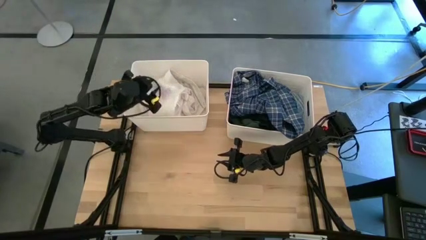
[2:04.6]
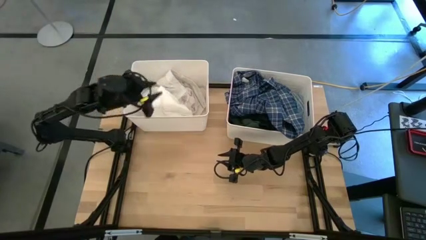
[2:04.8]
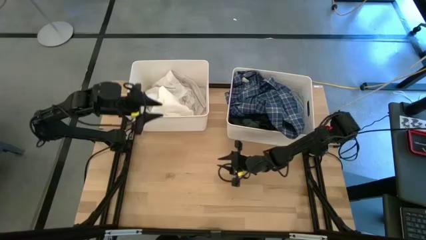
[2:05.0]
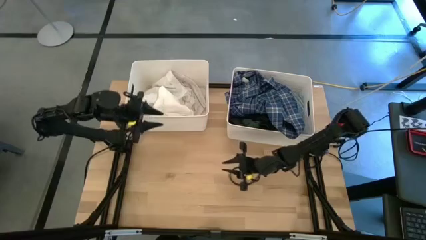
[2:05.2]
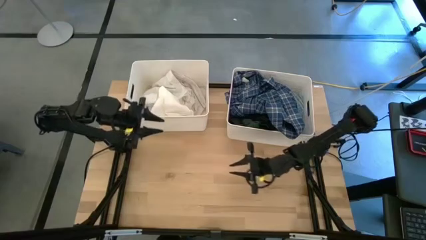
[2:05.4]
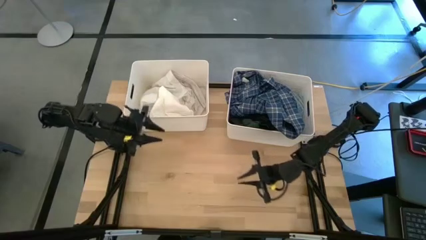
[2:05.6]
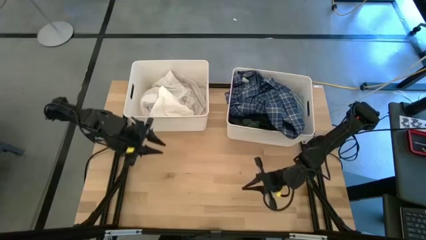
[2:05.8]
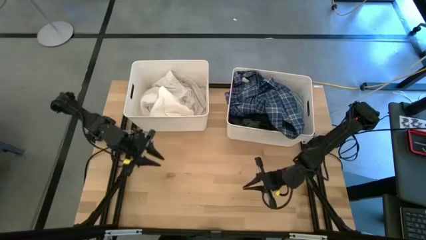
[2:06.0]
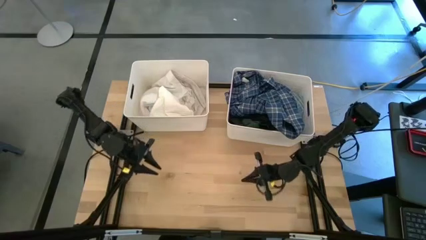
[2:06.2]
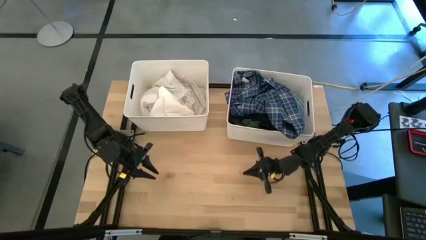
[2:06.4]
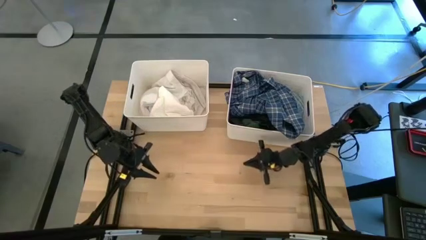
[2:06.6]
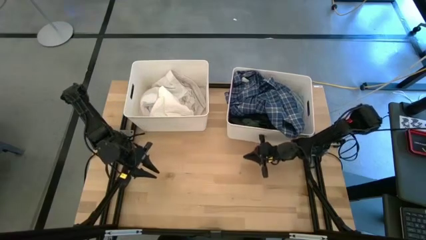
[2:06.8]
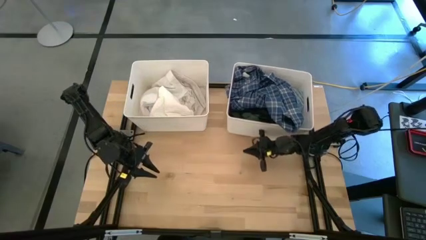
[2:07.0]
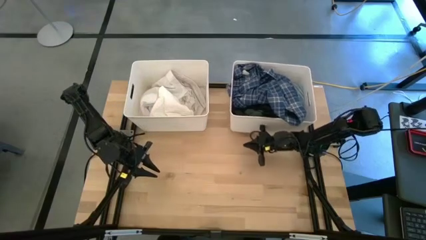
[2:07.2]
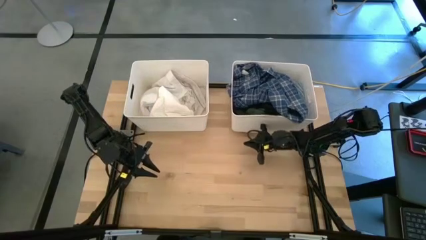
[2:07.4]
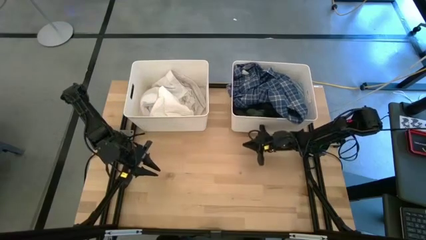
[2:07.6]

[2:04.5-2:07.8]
Task: Sort clothes
Adjust the right white bin

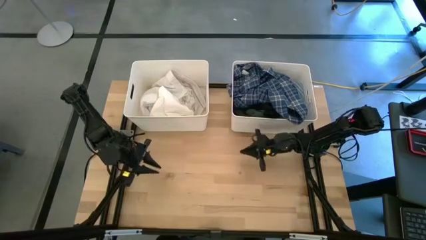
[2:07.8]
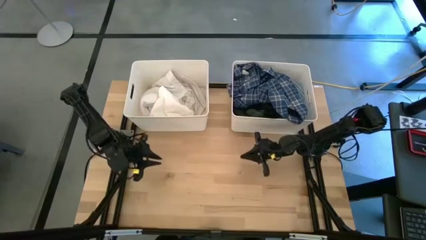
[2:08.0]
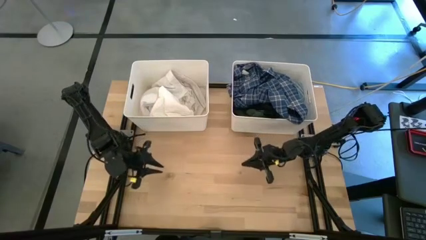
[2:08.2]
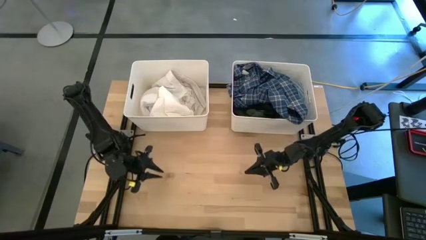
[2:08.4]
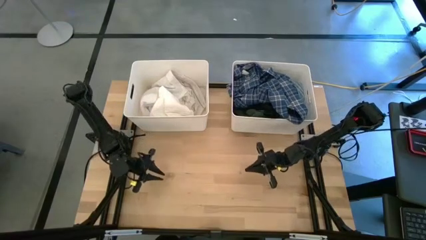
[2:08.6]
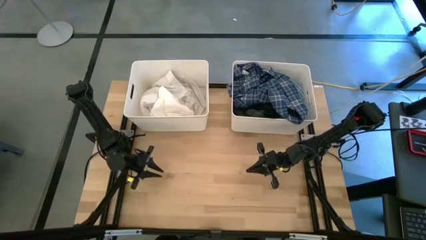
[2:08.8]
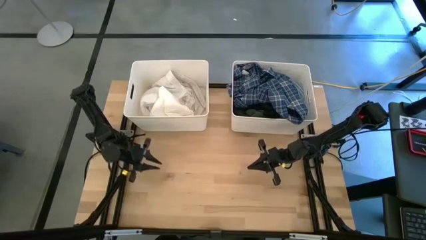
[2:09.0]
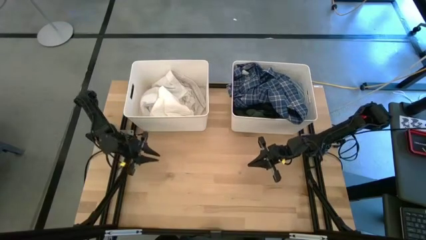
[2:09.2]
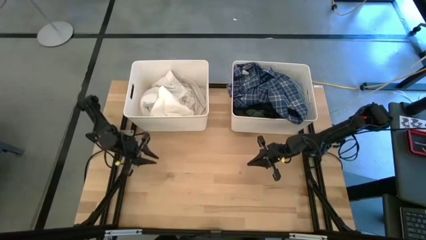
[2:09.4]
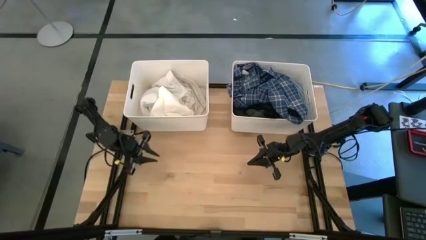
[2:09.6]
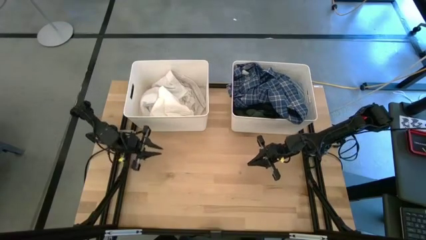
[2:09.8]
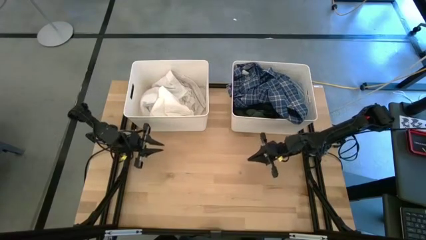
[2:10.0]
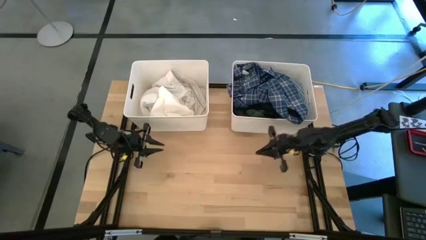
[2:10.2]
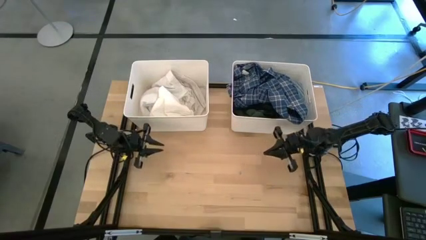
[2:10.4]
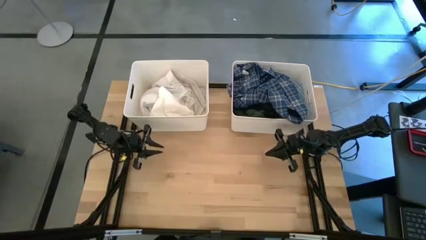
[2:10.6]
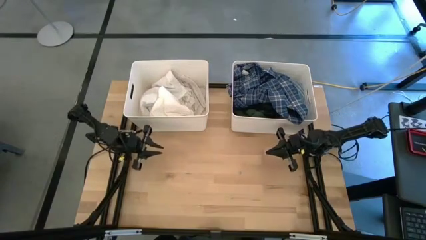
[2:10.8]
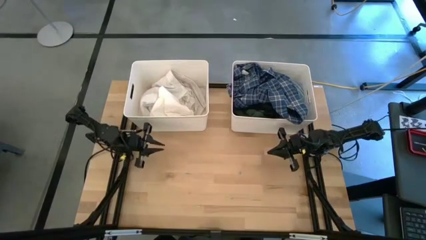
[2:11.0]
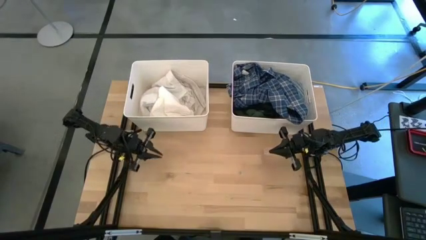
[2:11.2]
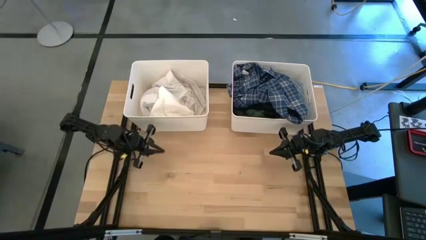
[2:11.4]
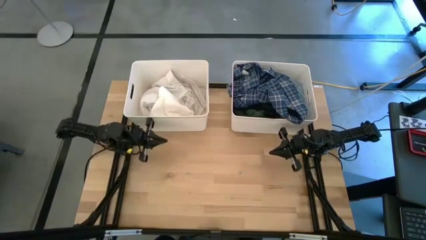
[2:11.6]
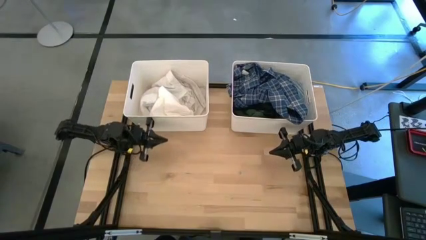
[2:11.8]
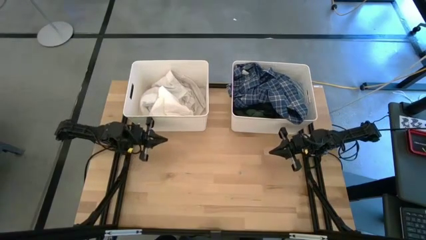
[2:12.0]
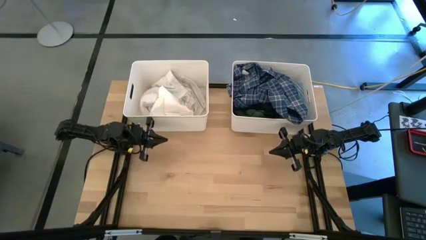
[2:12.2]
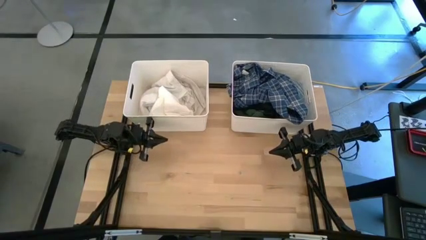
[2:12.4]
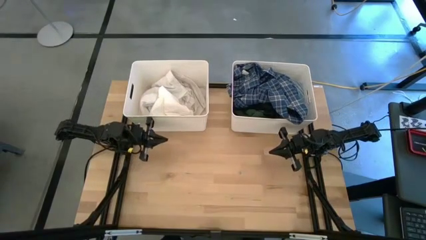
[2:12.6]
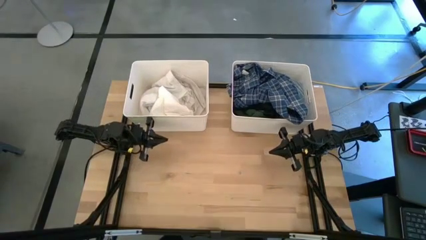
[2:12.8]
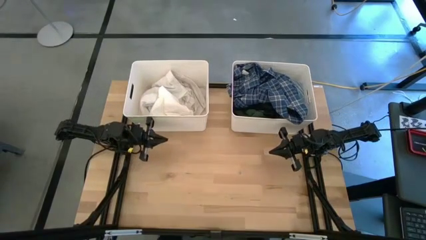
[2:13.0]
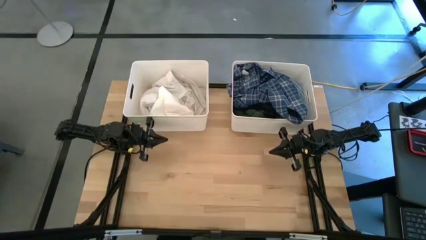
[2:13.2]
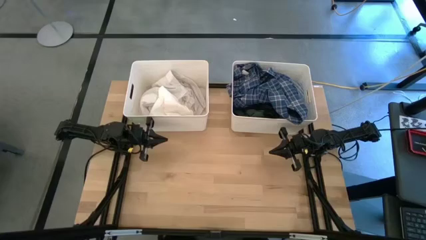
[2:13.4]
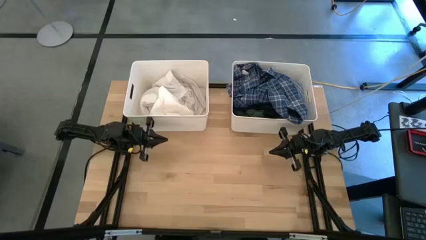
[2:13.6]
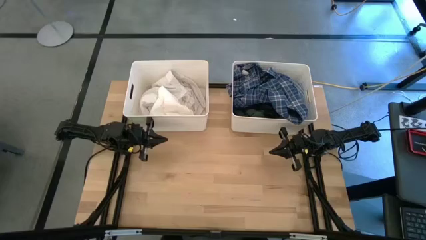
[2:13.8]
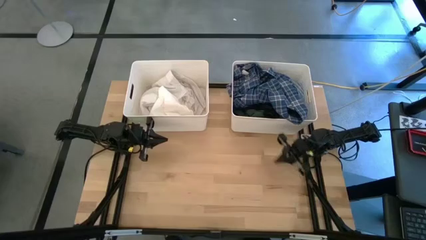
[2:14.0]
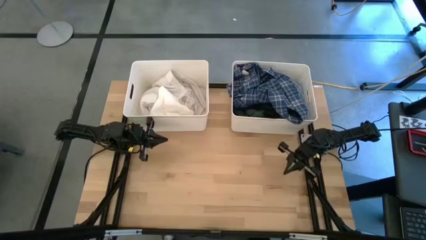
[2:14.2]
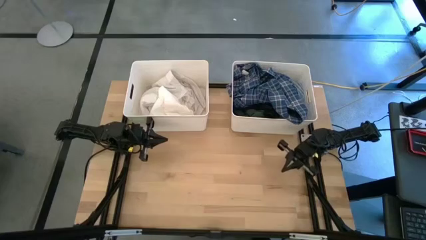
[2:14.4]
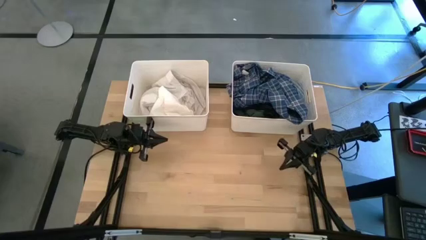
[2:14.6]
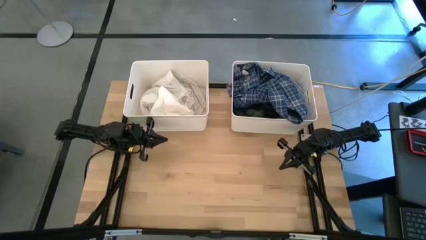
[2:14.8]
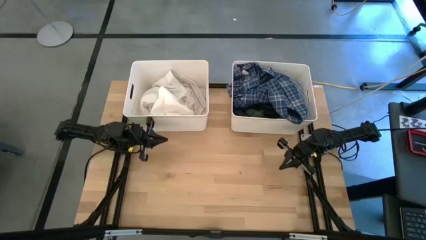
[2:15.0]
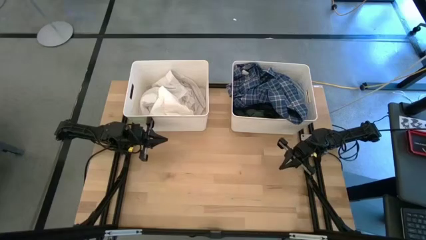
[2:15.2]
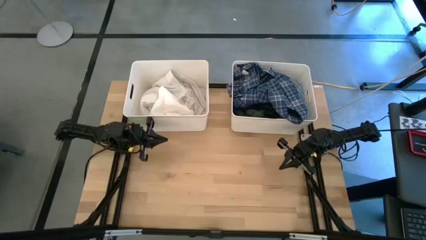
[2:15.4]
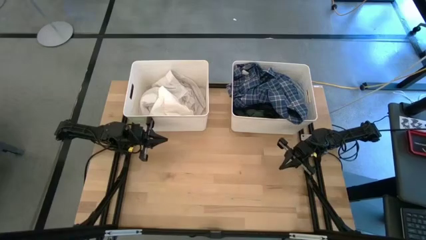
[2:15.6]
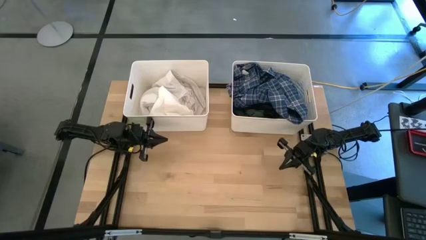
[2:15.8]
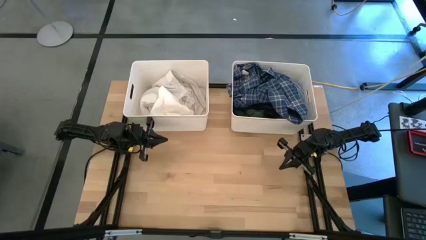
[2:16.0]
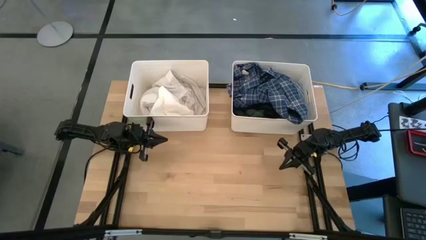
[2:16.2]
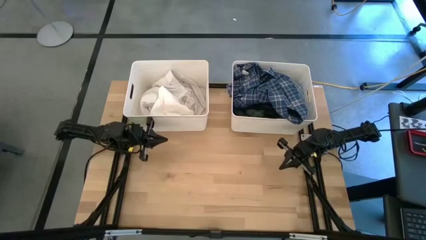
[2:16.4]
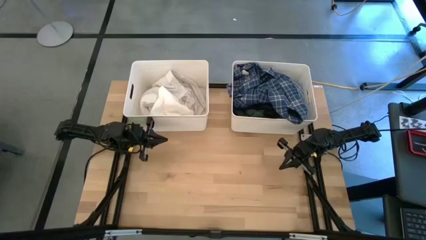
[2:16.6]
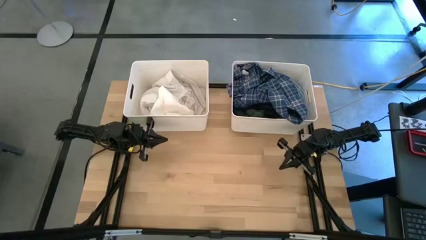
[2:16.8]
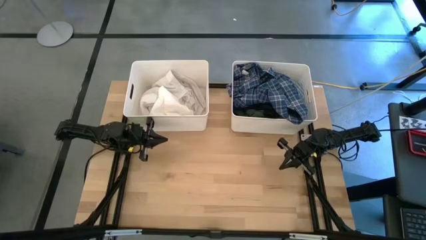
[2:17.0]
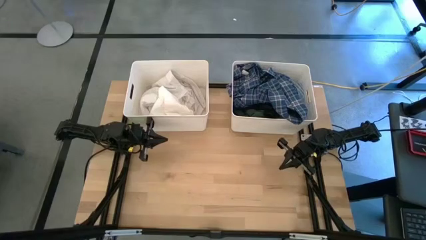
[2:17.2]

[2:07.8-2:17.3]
Return to Home Position

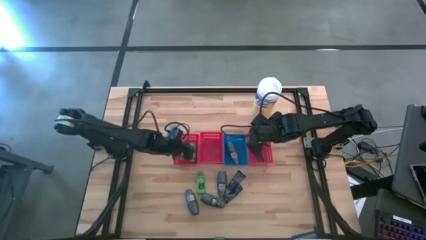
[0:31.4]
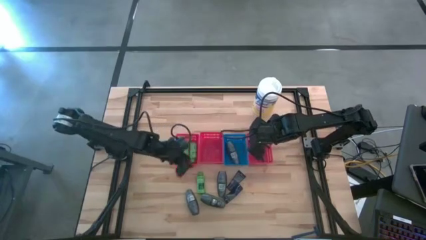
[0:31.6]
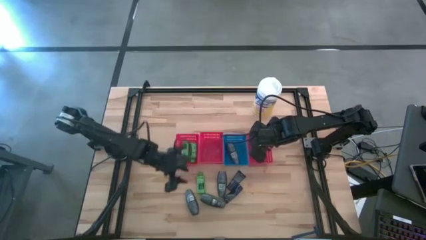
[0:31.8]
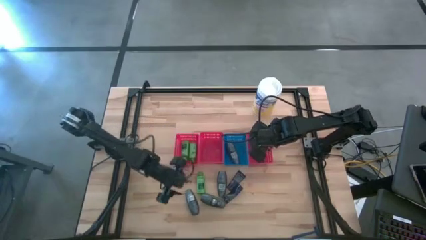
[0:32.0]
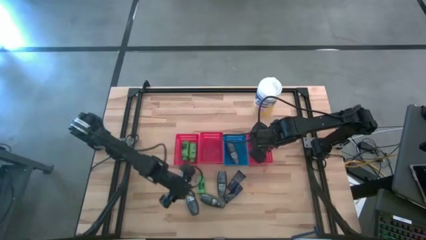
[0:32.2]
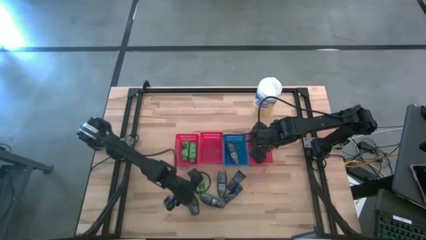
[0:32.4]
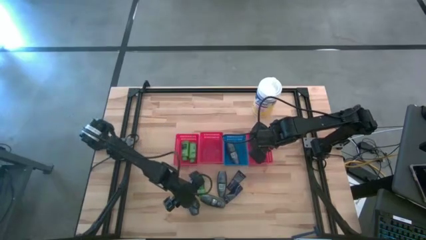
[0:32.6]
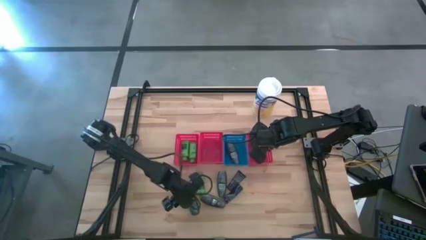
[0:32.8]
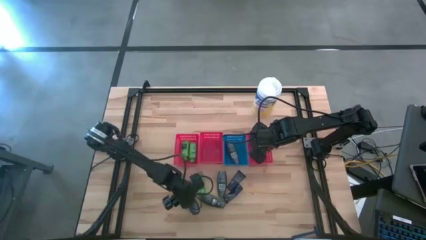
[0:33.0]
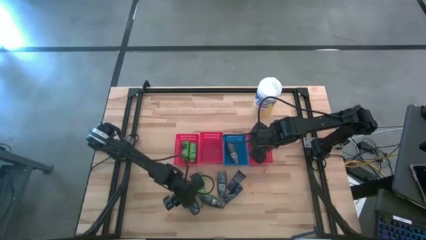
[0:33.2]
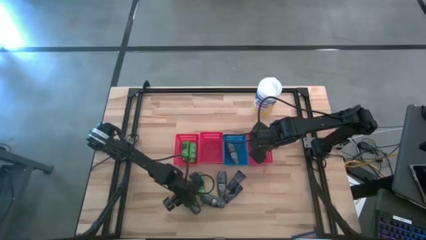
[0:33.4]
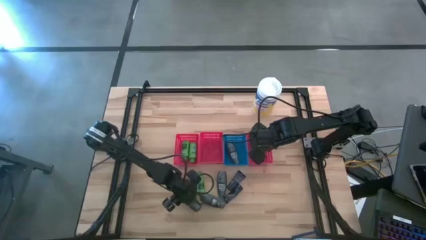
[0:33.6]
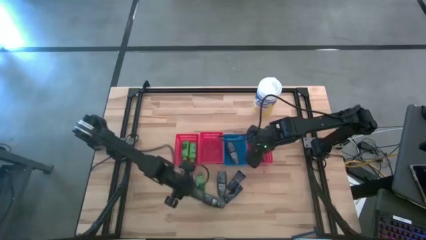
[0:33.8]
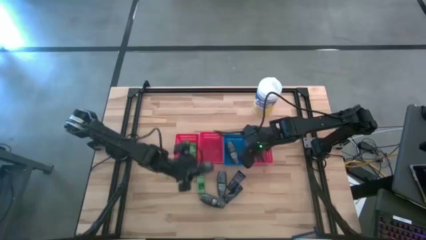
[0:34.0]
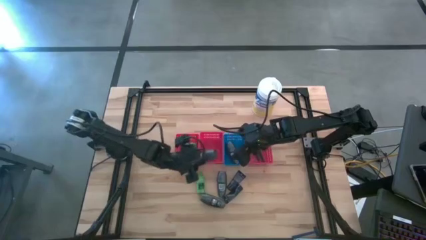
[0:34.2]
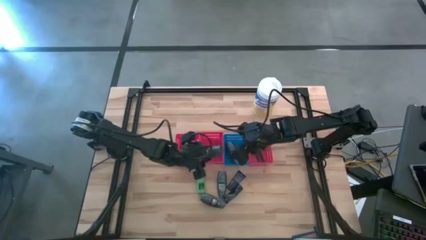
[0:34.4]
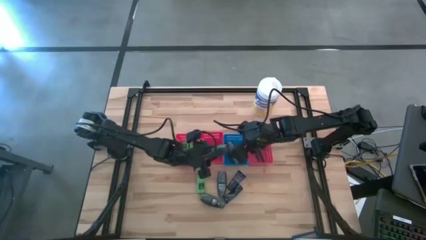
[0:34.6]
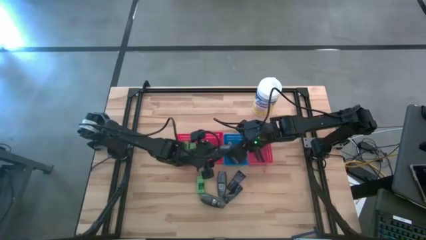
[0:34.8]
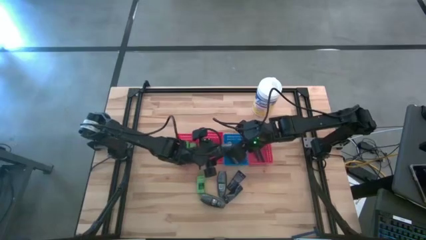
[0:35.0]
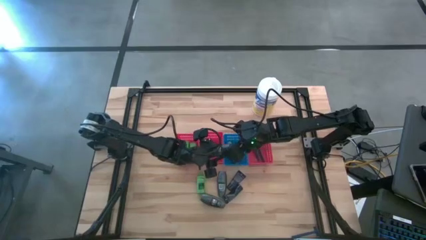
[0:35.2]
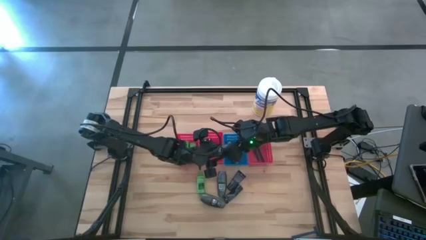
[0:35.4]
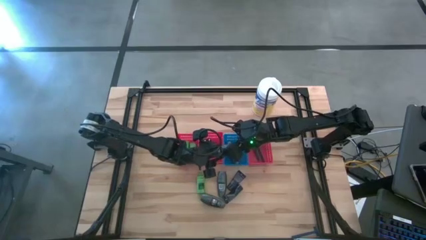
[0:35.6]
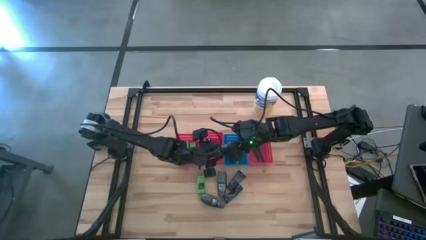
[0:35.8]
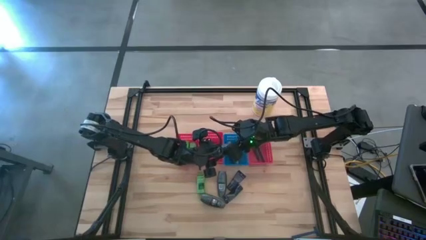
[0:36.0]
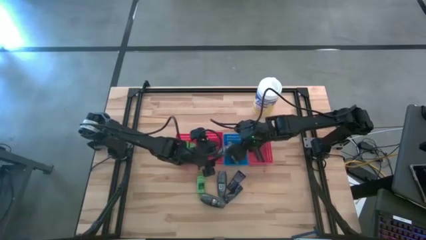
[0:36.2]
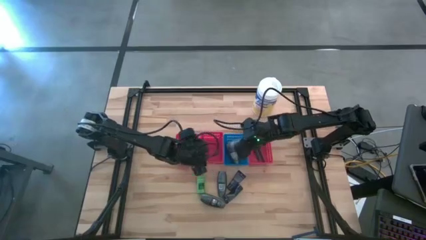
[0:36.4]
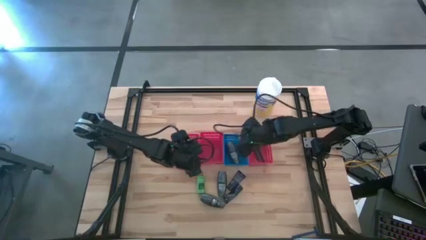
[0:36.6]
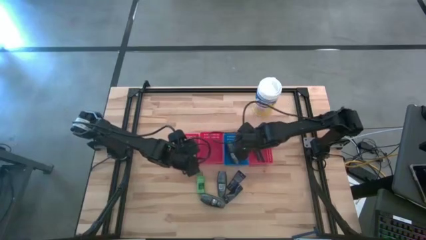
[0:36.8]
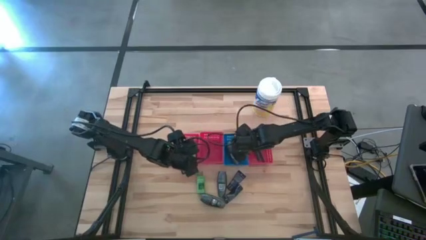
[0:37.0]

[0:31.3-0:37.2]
Task: Pick & Place Travel size toiletries
Put the deodorant into the blue bin
